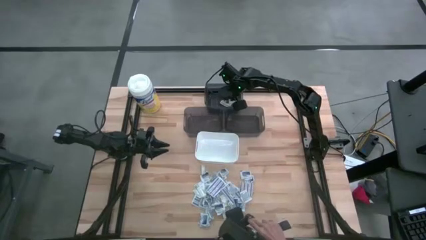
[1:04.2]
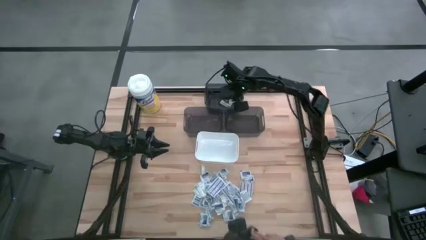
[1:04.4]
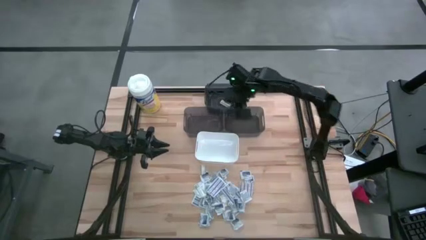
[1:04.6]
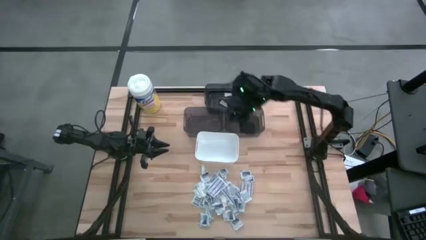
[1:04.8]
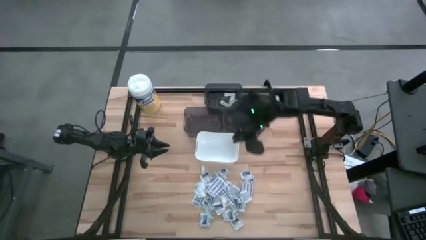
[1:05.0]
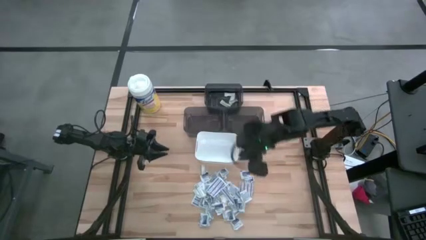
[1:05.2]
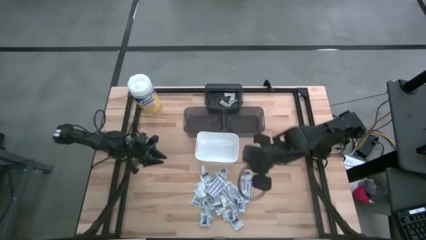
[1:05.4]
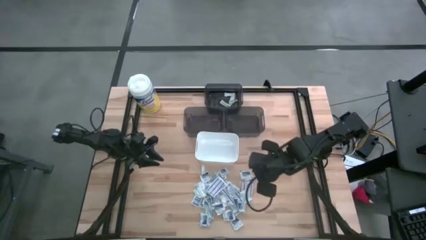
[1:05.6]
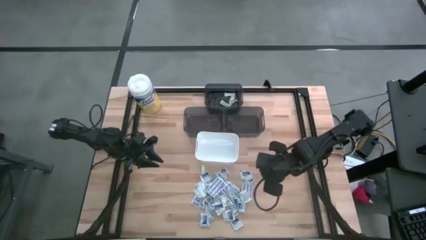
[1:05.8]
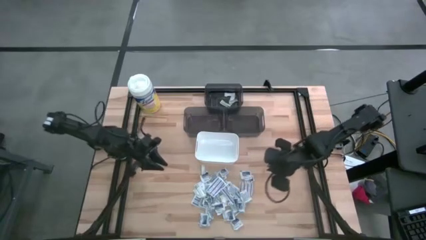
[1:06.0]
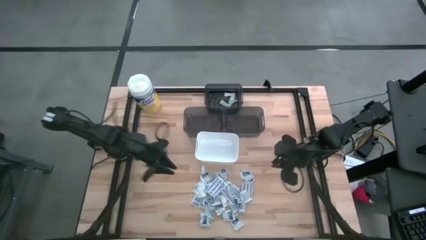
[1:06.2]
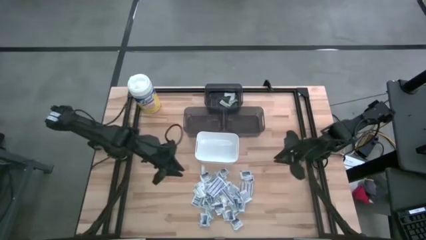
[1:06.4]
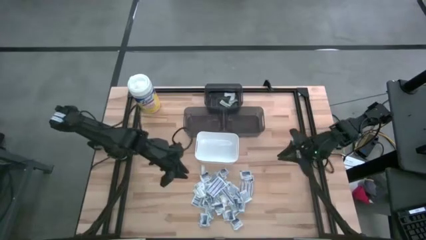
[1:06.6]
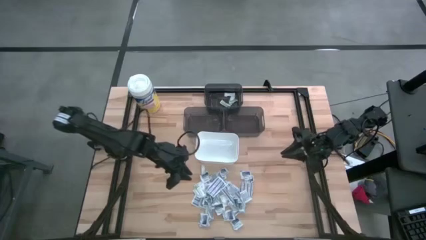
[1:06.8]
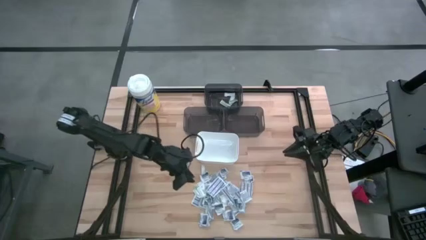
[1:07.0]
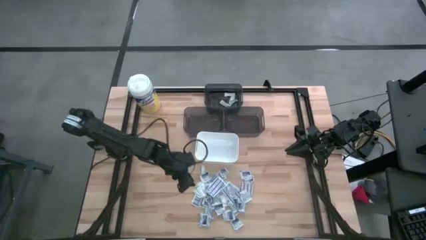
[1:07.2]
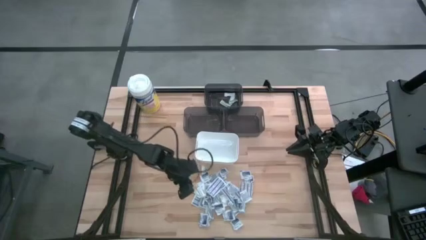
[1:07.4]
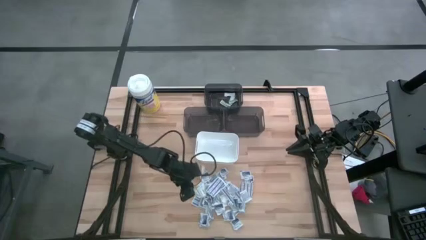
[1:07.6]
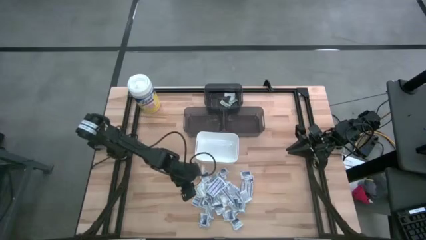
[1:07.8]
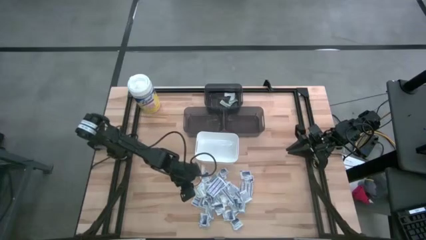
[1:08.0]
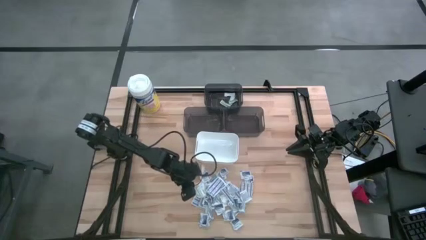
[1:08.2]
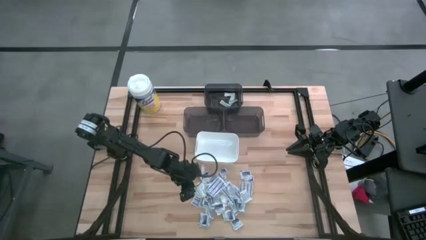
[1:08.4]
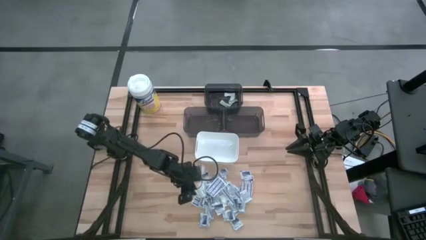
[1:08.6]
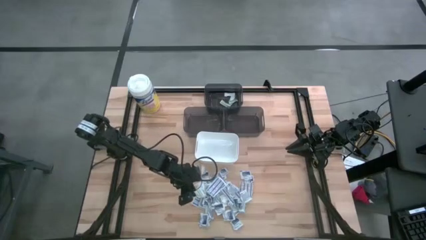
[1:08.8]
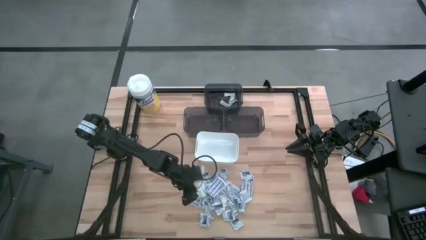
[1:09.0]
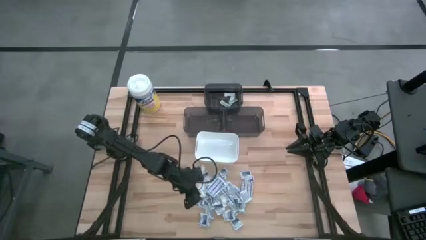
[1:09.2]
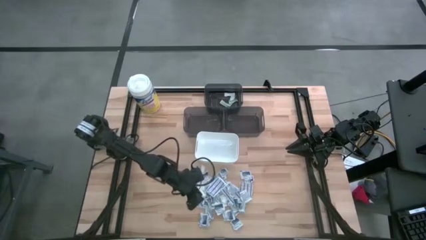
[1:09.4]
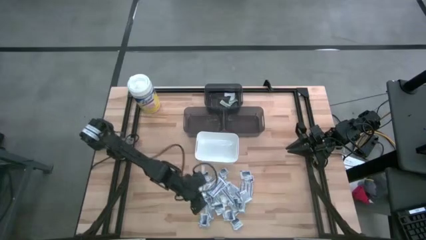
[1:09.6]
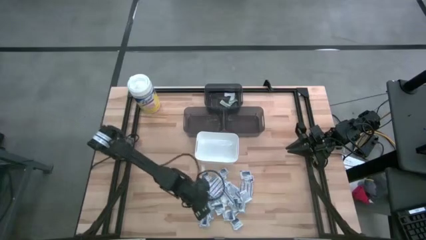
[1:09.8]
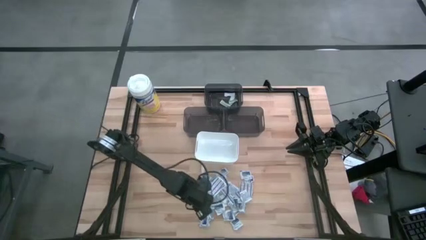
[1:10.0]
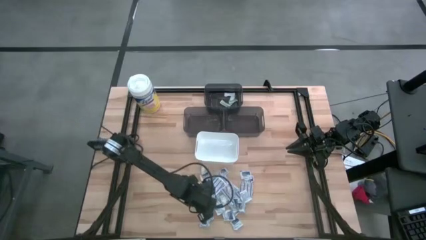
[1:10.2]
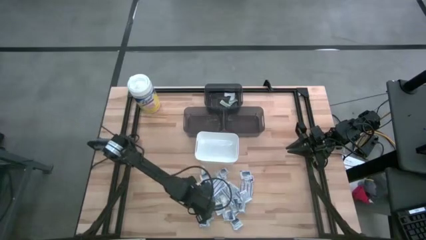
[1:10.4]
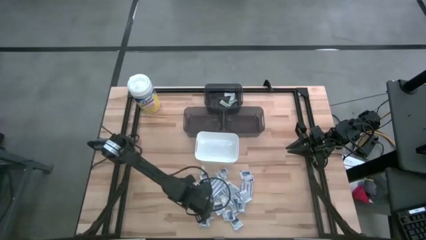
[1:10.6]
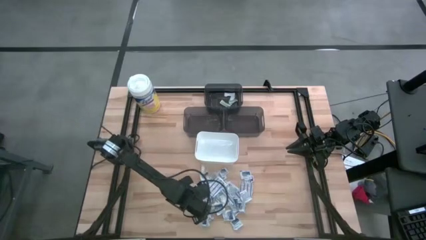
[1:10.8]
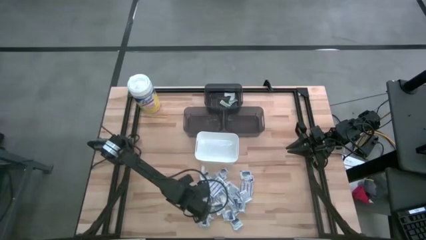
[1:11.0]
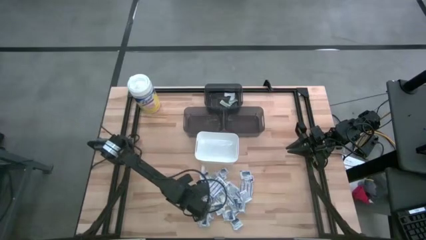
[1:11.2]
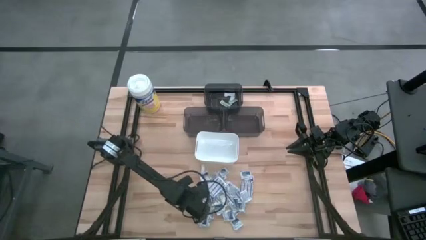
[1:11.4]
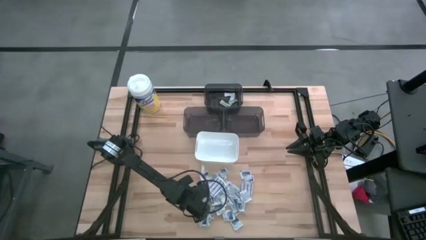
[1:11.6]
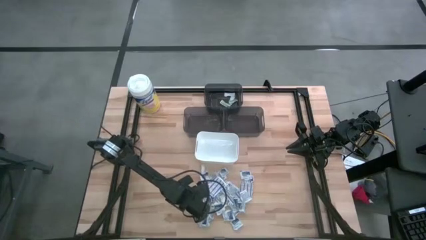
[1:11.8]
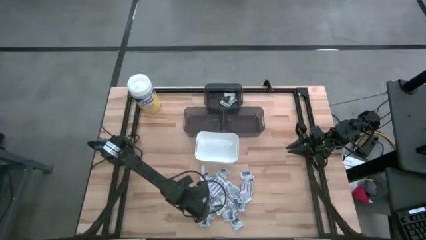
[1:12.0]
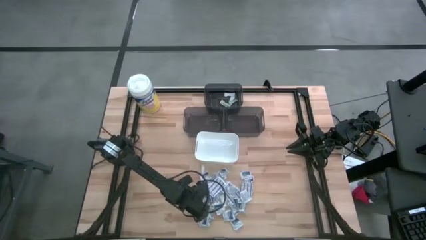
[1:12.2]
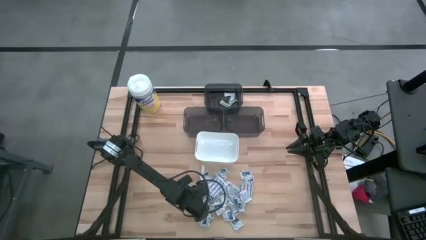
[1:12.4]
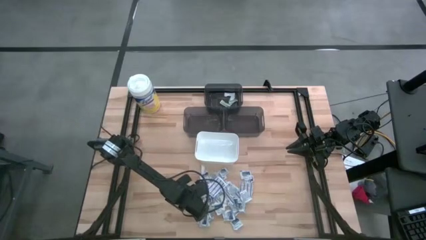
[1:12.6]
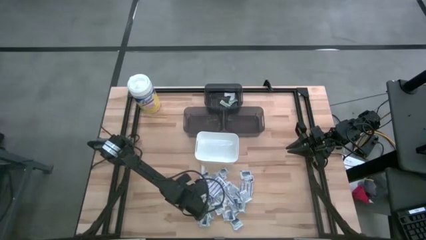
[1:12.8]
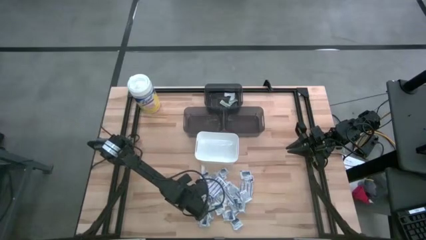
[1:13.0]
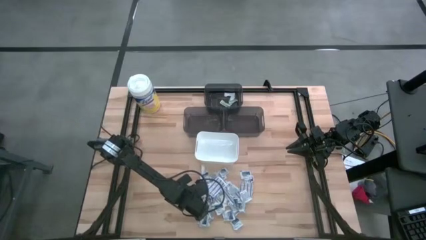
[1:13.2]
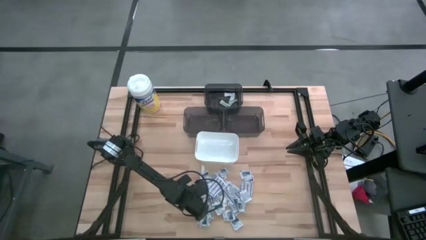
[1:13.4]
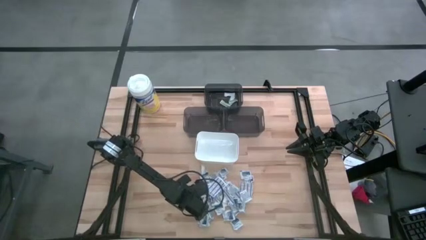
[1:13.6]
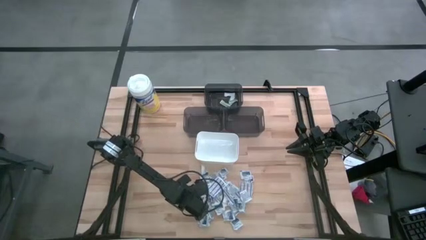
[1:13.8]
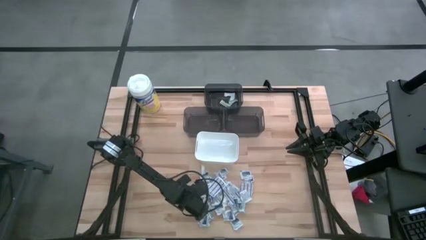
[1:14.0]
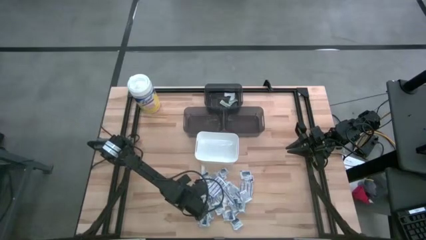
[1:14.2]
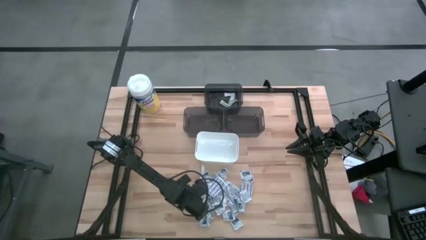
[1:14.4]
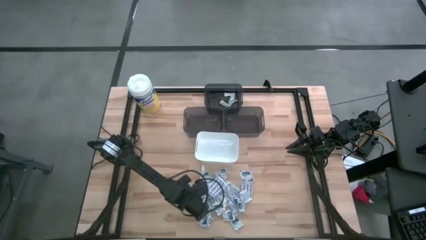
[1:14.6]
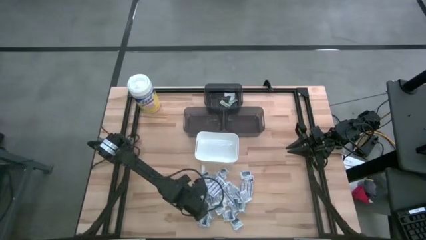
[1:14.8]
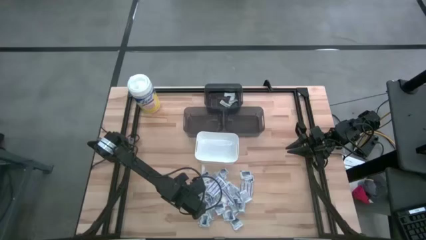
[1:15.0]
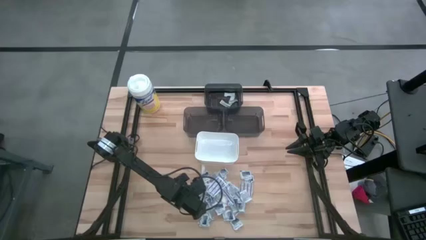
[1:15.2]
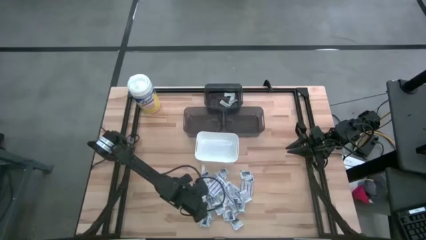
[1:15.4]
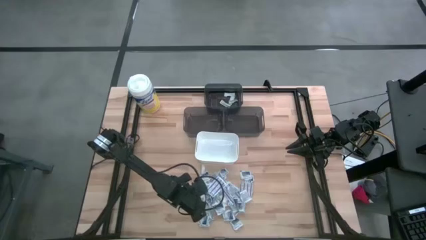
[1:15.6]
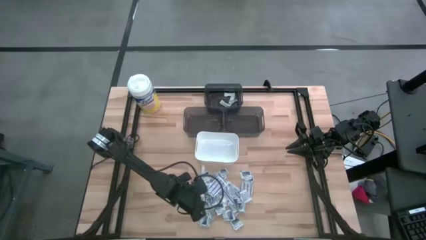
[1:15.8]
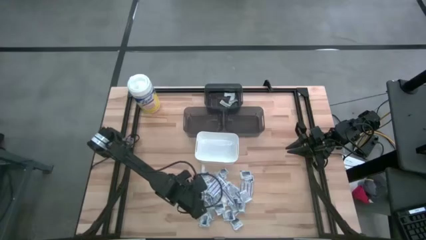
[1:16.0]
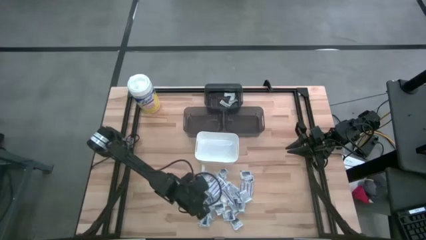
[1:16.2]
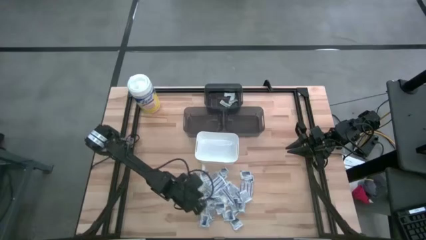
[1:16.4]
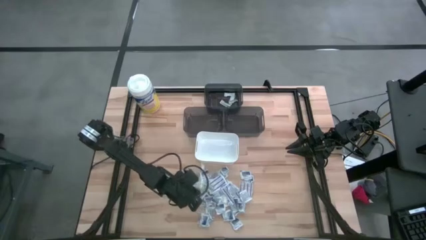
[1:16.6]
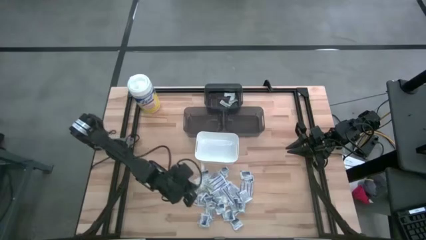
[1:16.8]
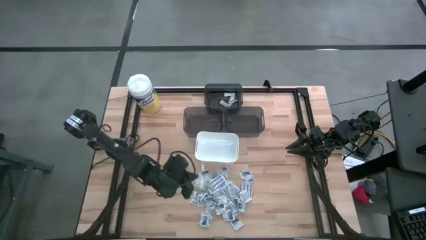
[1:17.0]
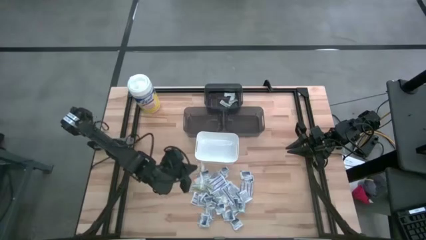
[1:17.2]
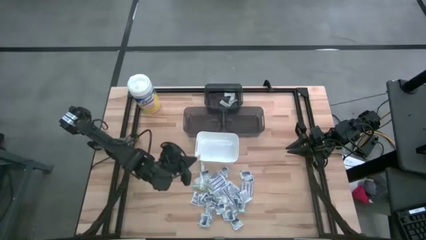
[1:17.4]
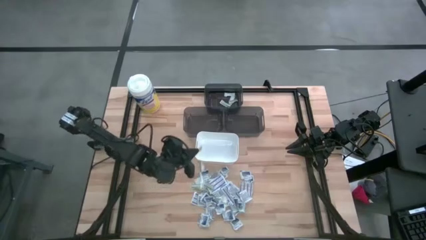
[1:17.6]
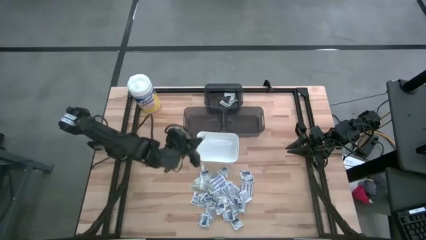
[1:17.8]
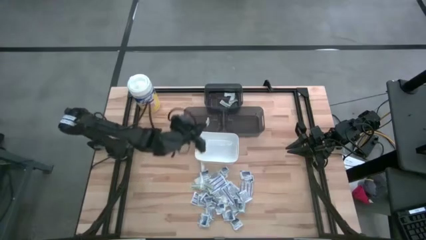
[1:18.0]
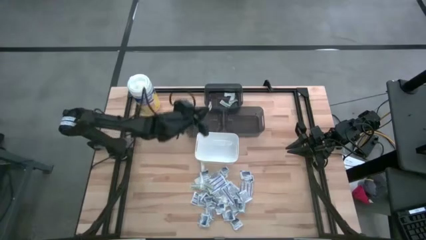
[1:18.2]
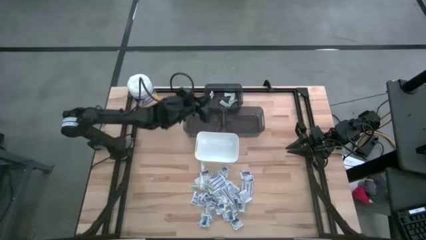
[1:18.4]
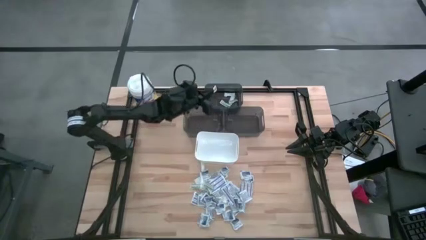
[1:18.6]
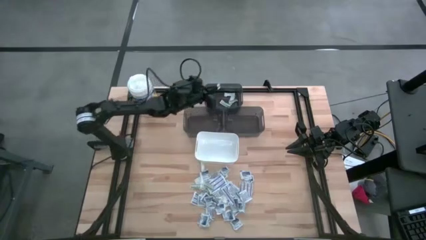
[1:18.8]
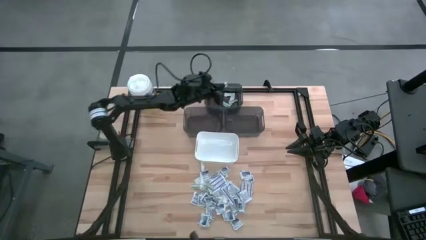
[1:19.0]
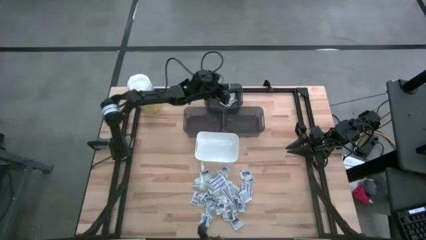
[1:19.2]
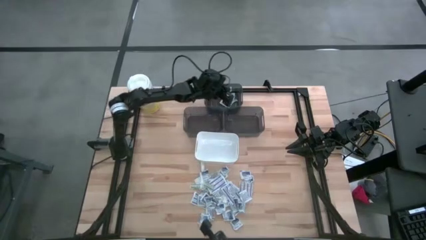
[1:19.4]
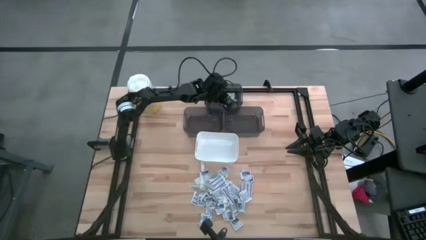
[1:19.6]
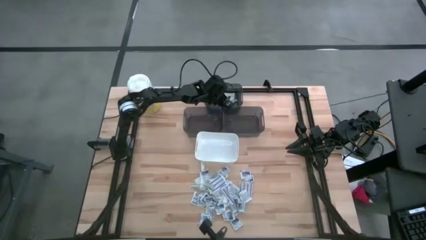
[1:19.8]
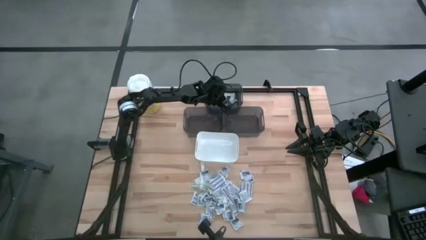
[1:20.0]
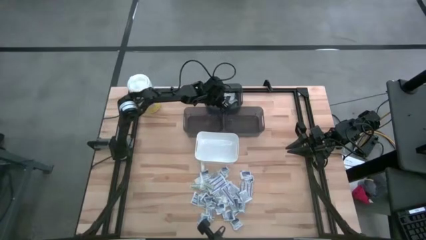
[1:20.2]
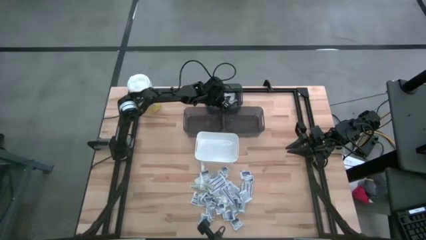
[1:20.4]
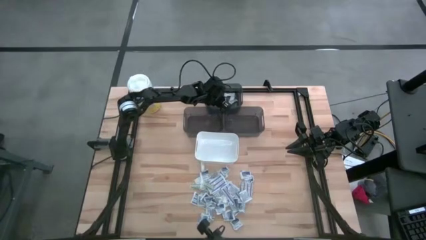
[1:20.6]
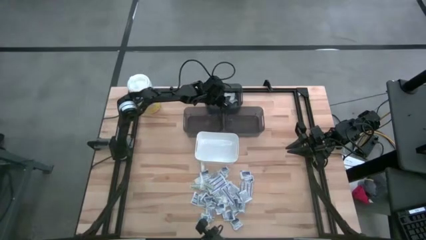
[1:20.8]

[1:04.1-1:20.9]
Task: Pick & Place First Aid Supplies
Put the green bandage into the top black bin
